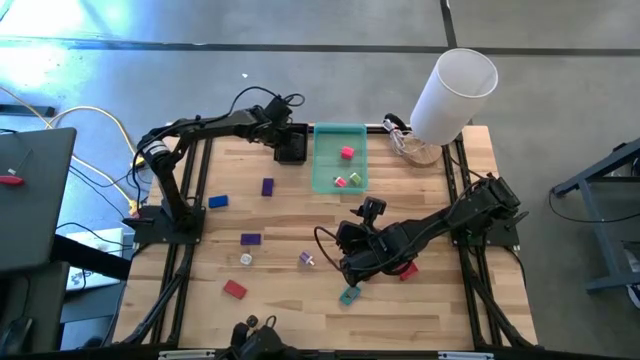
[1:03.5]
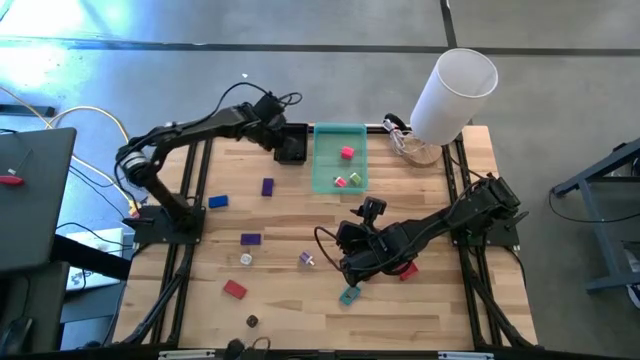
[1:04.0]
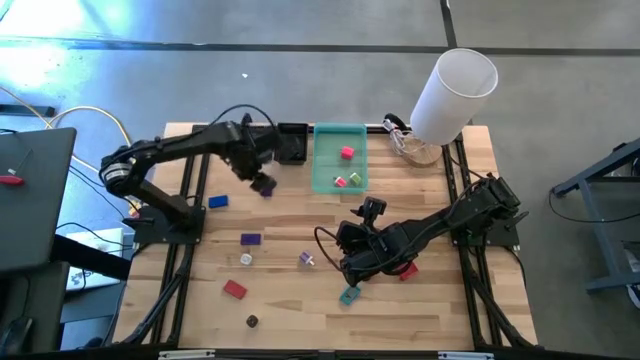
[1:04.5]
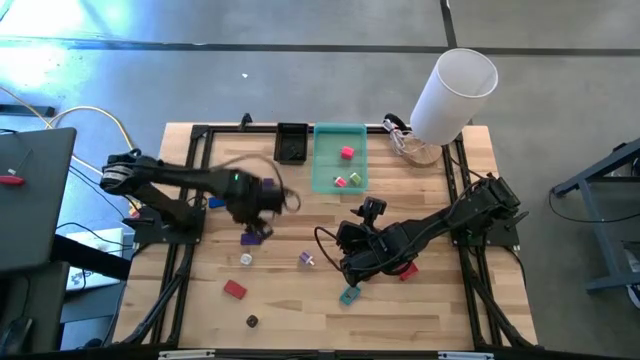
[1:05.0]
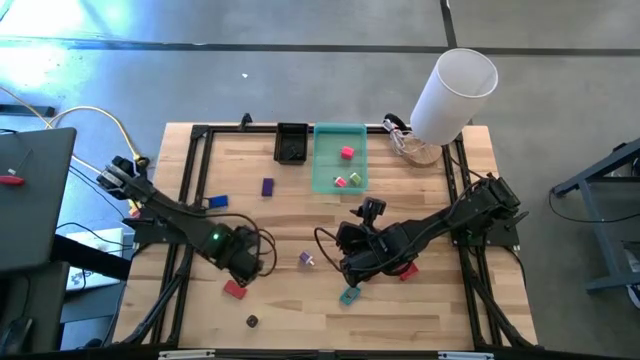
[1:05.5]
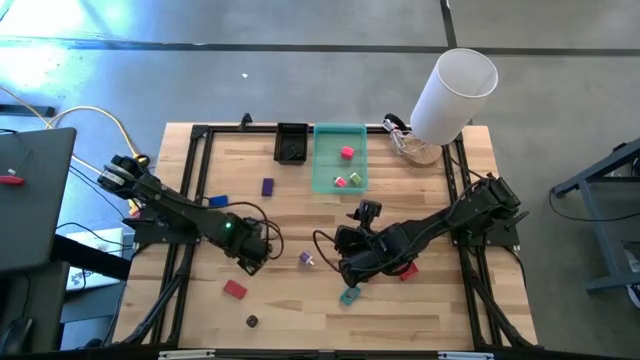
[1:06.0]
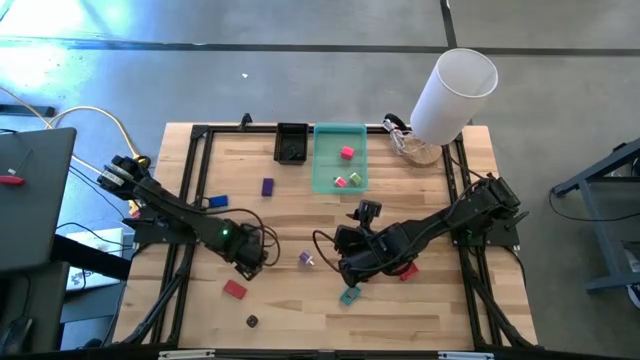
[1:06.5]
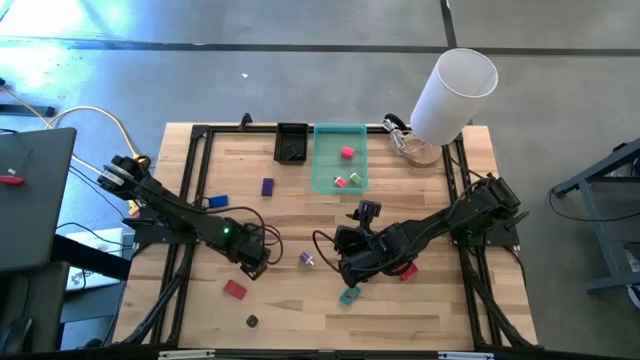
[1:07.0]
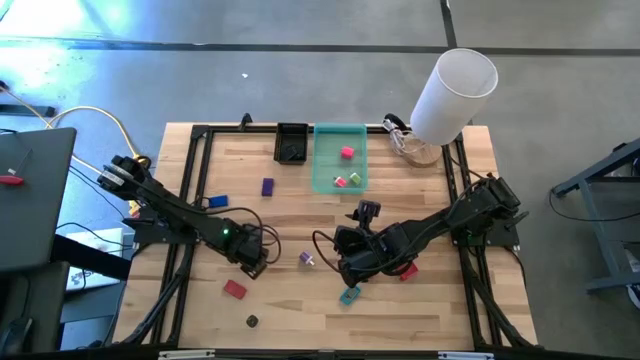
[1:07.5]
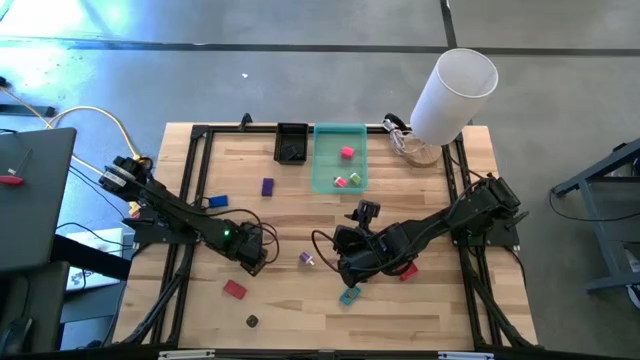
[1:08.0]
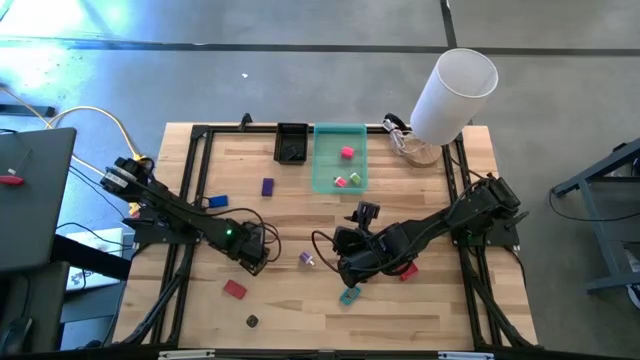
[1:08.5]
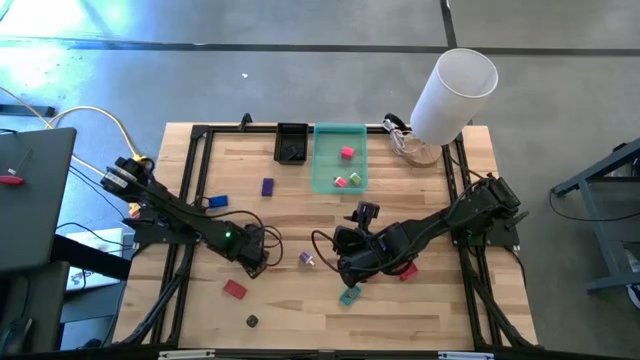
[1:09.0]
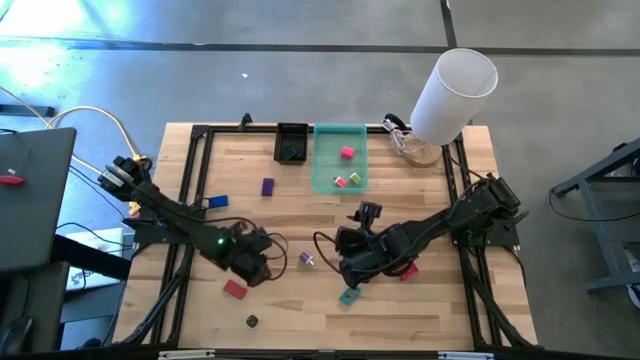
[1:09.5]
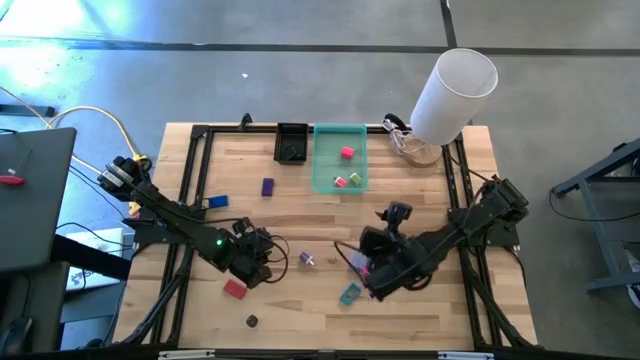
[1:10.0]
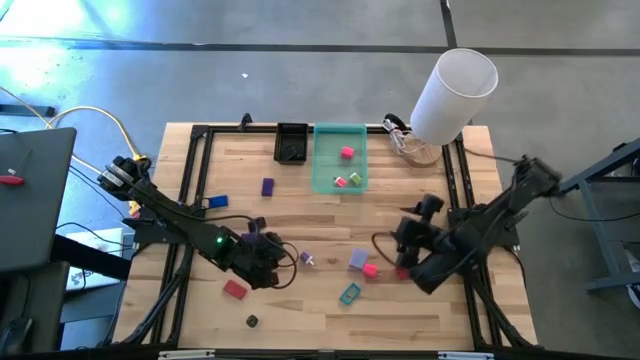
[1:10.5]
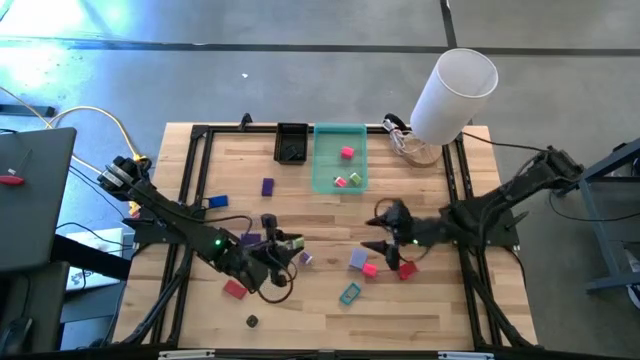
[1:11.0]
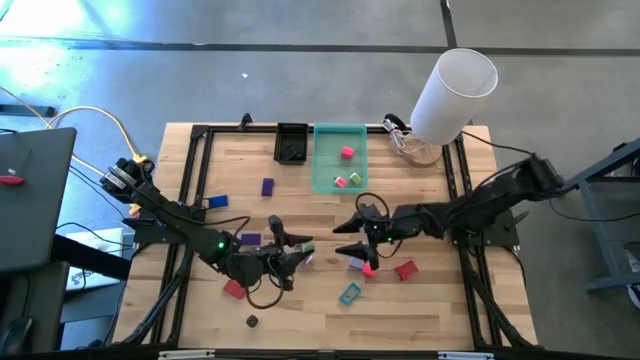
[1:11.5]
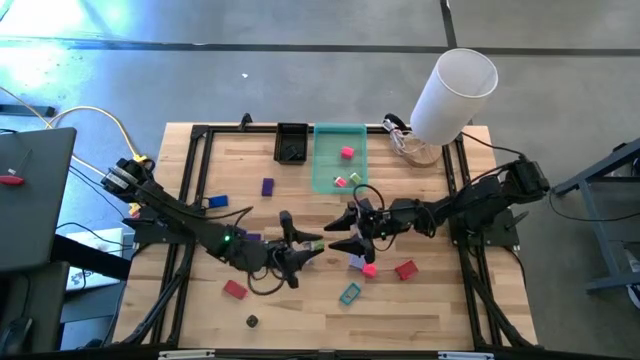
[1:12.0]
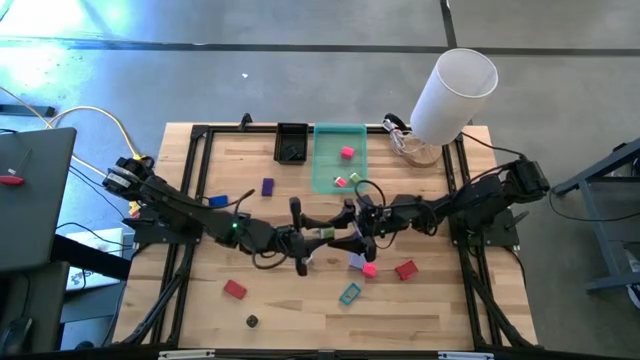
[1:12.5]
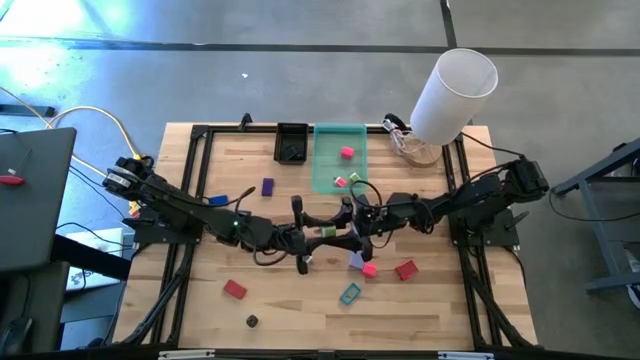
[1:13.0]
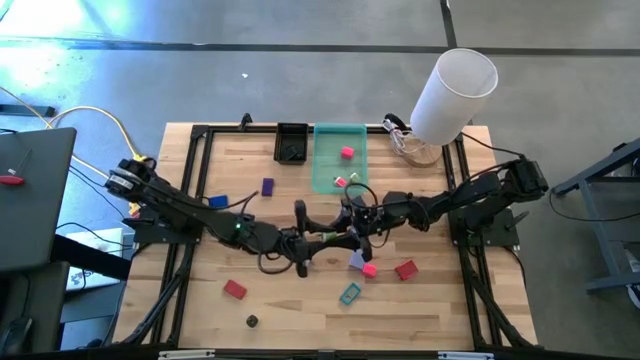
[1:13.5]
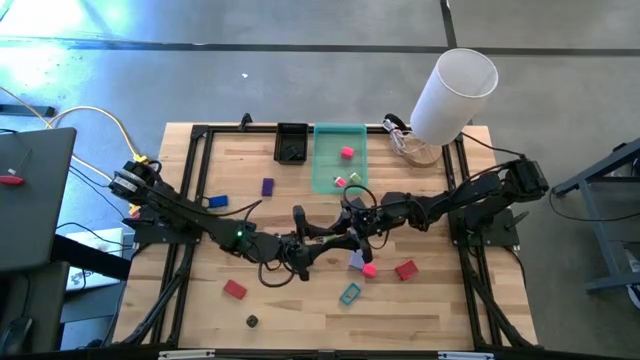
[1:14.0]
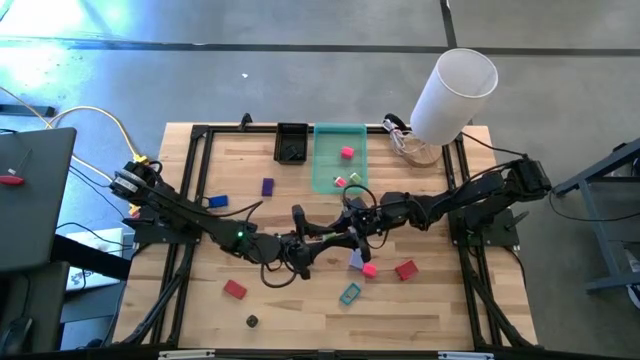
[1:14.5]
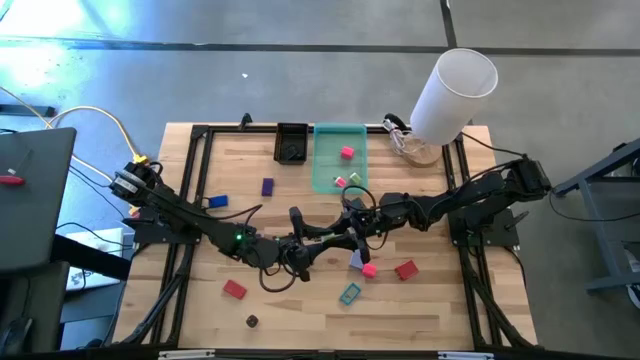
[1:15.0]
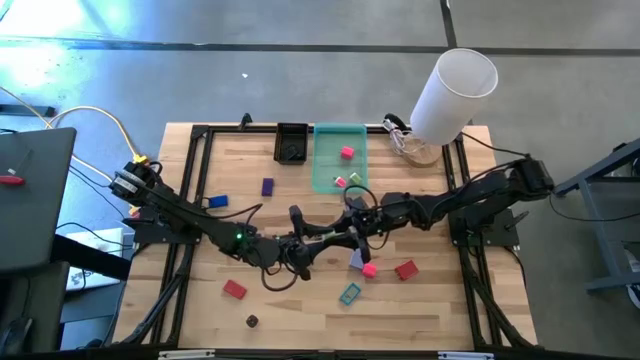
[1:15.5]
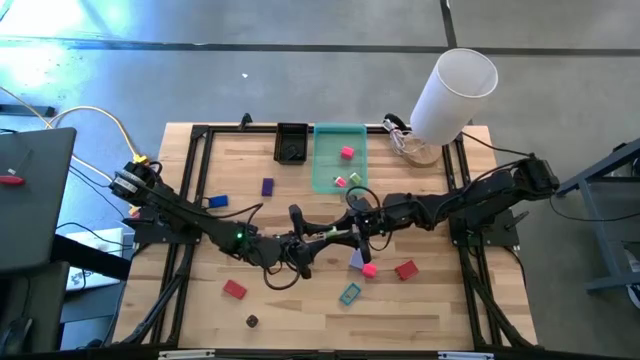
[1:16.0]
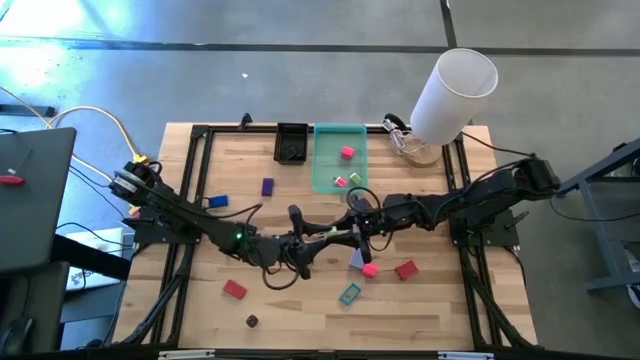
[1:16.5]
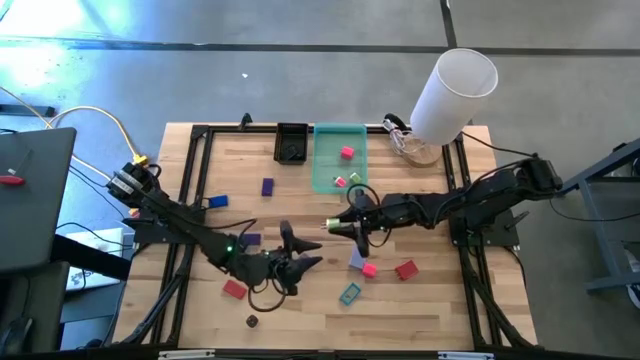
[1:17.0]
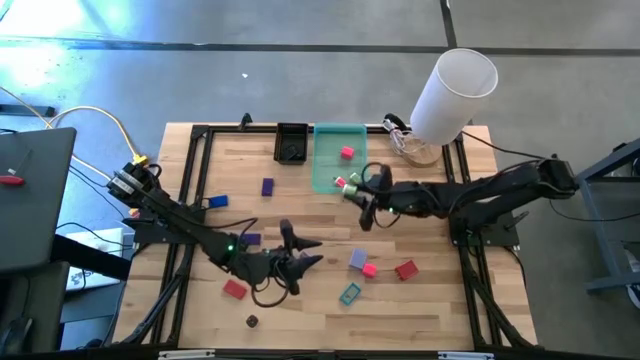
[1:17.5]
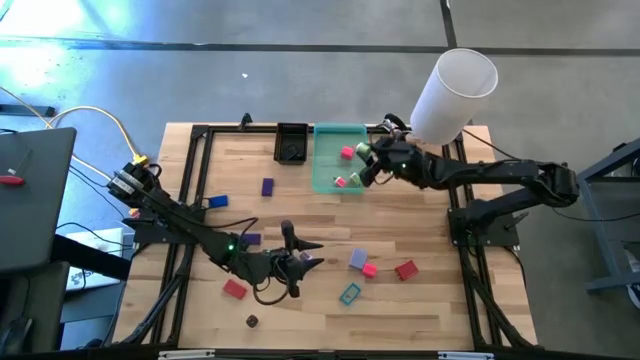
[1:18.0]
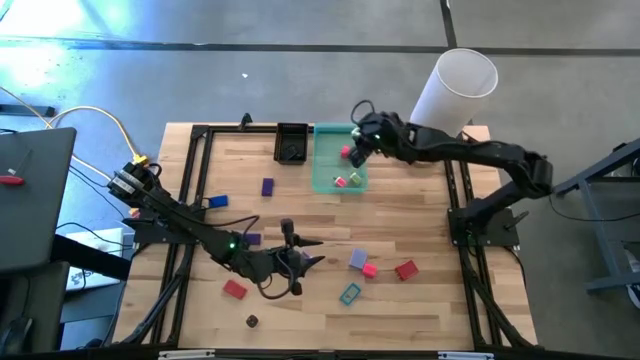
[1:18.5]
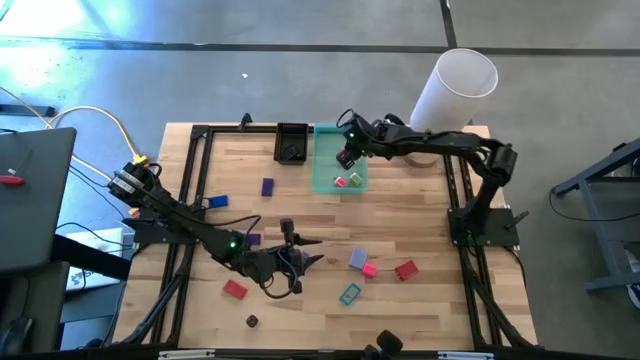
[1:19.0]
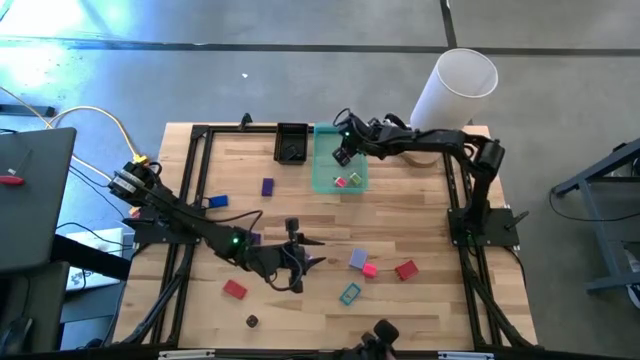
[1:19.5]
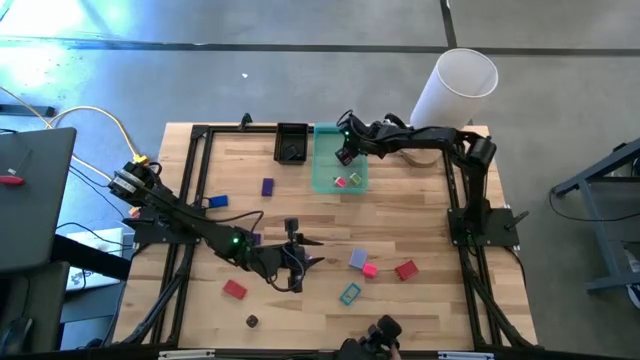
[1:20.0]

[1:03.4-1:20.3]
Task: Pick & Place Office items
Put the green charger adapter into the green bin

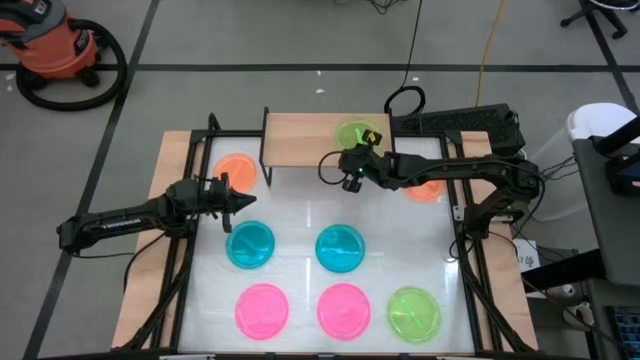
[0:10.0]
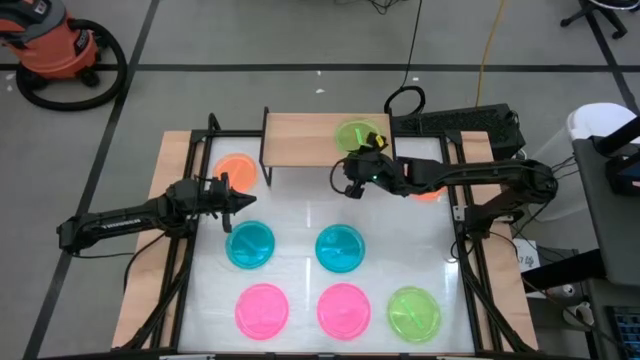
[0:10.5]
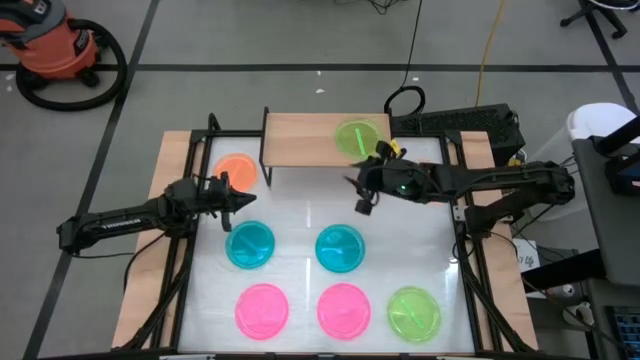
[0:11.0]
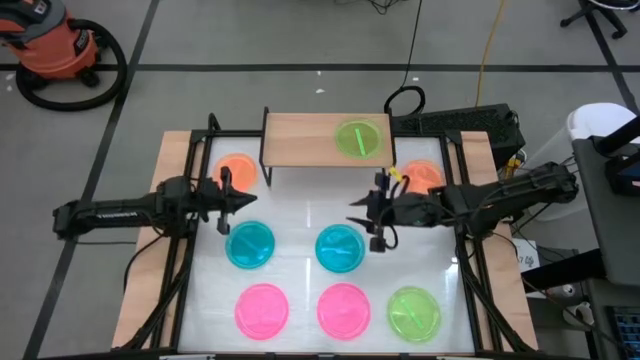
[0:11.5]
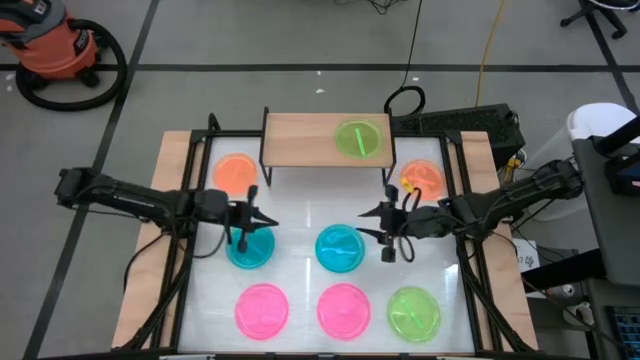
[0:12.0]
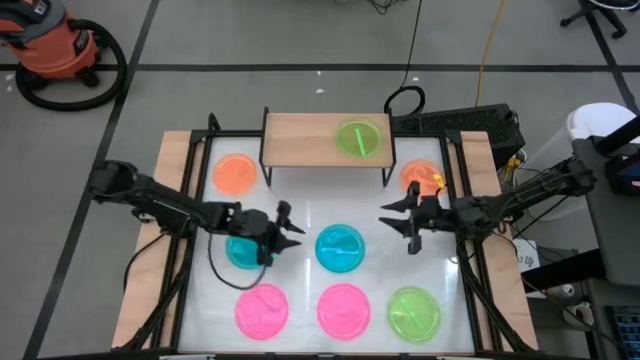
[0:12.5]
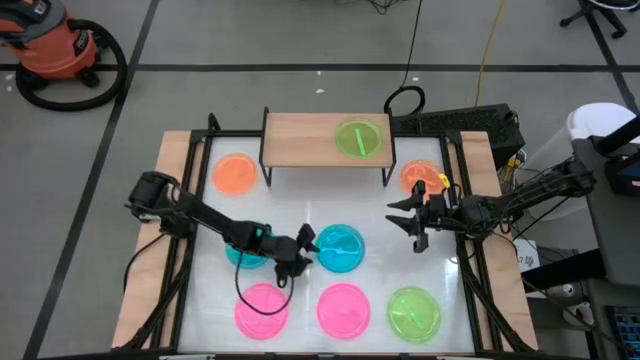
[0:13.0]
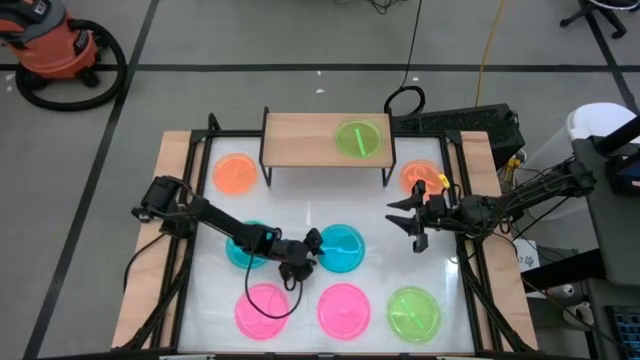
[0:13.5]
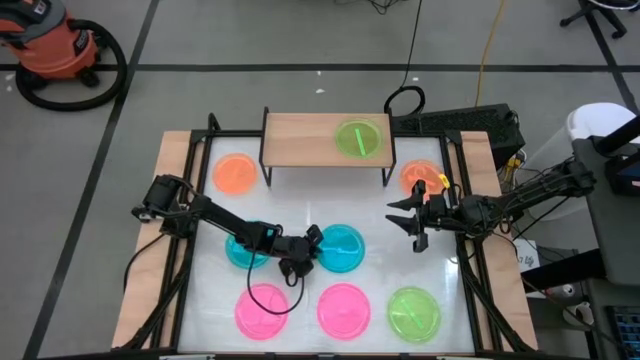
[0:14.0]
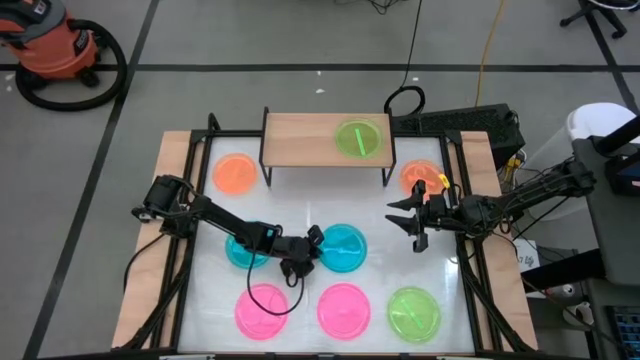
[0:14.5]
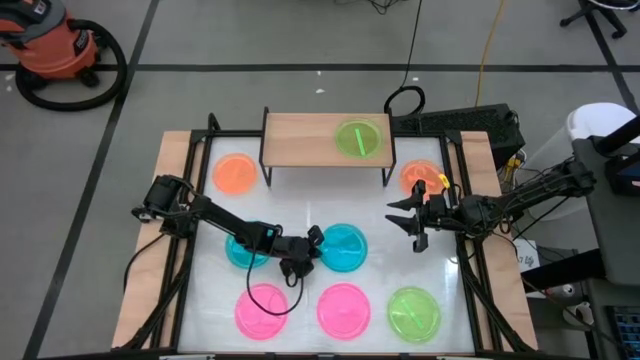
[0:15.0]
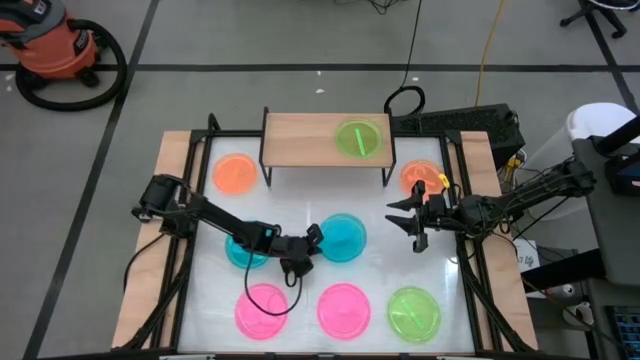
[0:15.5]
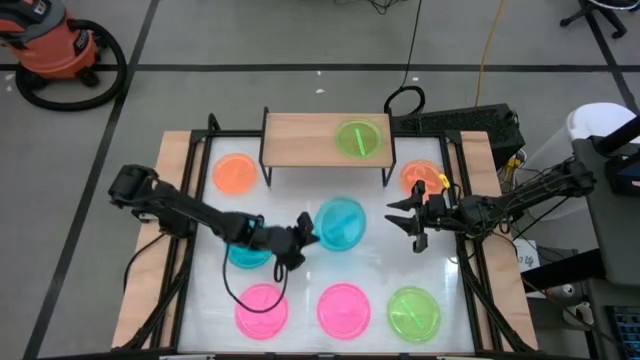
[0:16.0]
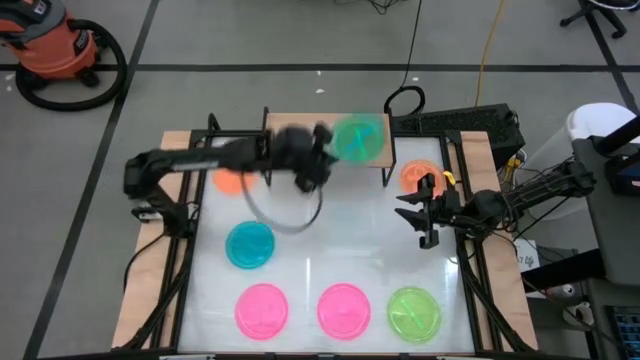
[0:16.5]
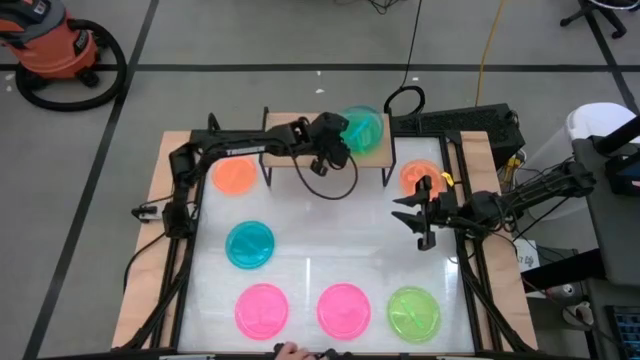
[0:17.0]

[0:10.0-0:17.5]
Task: Place and stack plates onto a shelf
Stack the right blue transparent plate on the green transparent plate on the shelf
